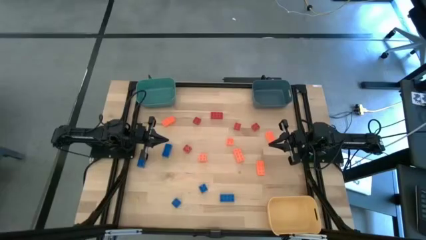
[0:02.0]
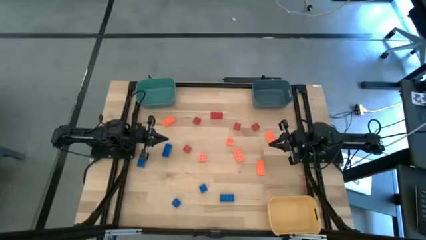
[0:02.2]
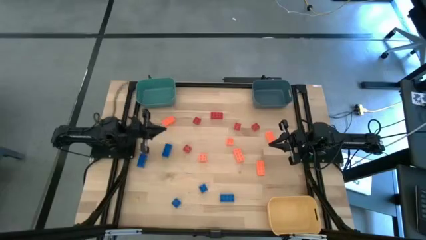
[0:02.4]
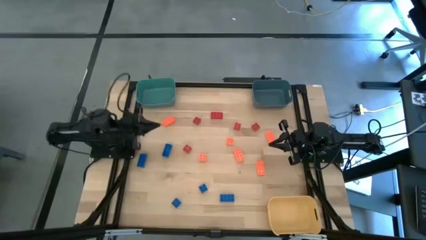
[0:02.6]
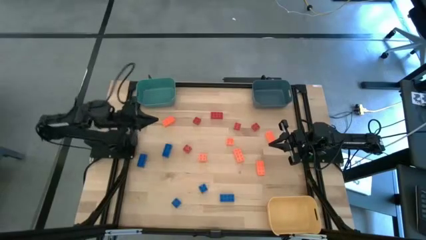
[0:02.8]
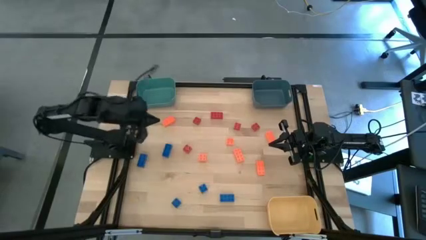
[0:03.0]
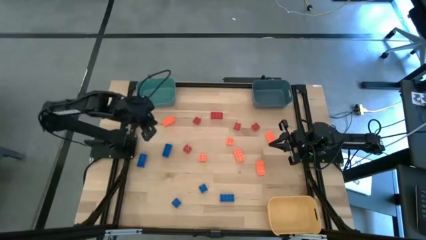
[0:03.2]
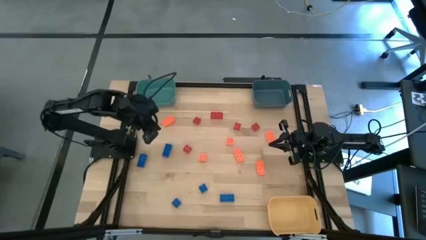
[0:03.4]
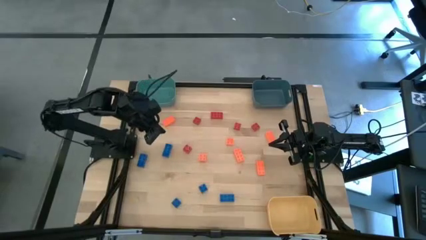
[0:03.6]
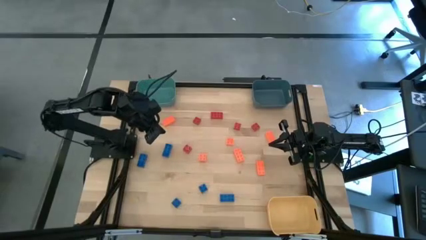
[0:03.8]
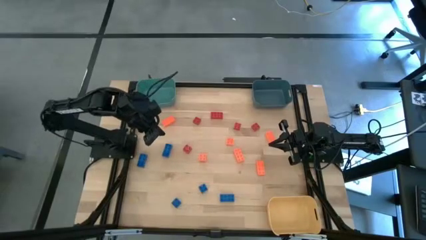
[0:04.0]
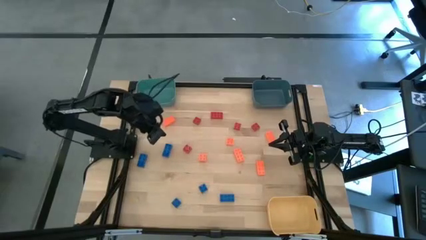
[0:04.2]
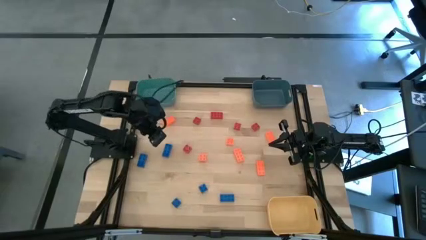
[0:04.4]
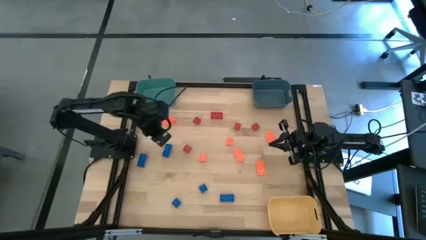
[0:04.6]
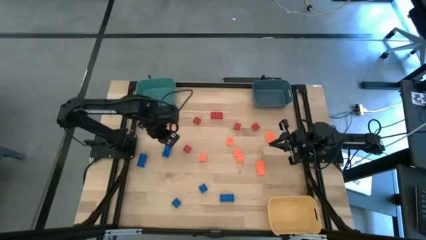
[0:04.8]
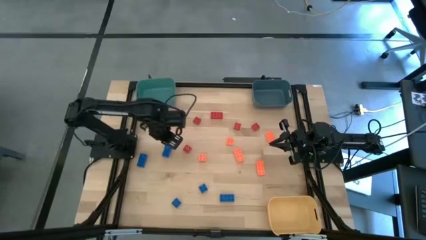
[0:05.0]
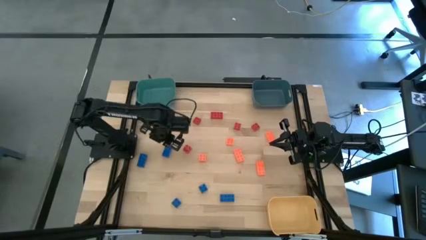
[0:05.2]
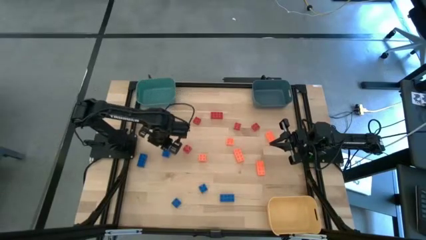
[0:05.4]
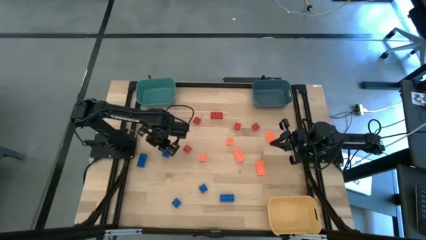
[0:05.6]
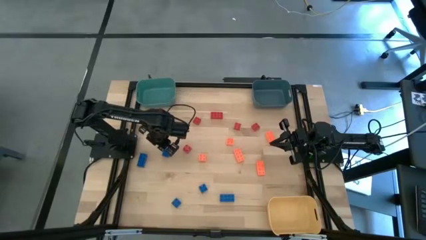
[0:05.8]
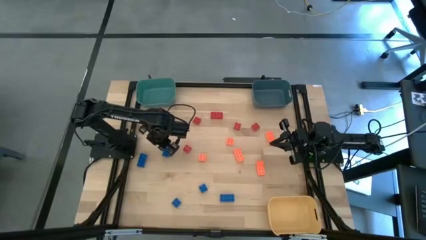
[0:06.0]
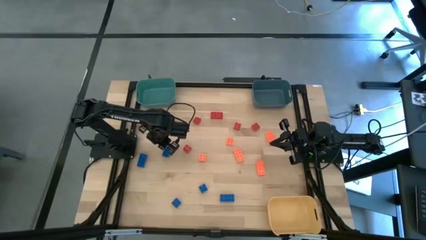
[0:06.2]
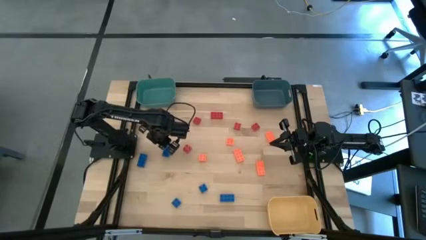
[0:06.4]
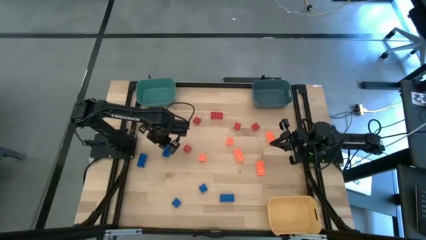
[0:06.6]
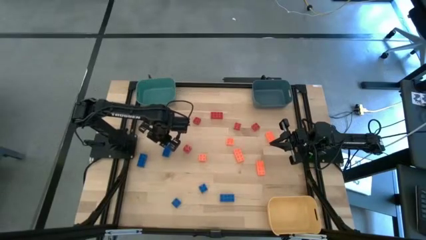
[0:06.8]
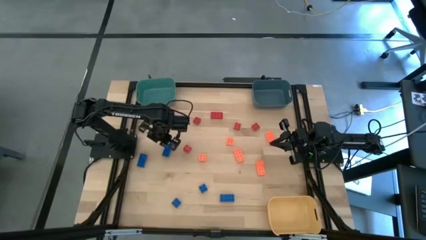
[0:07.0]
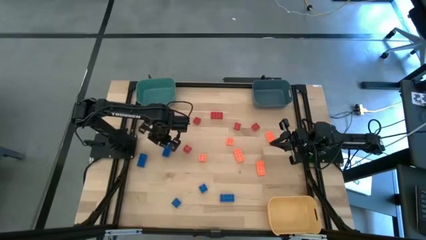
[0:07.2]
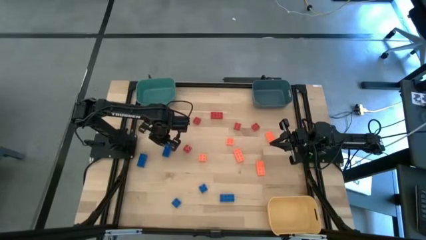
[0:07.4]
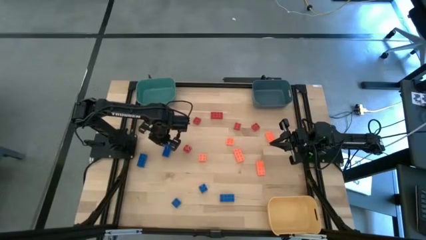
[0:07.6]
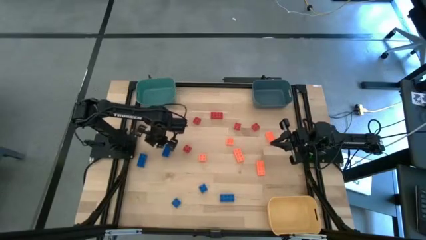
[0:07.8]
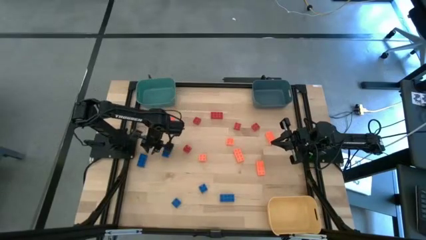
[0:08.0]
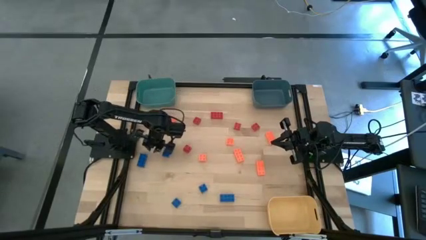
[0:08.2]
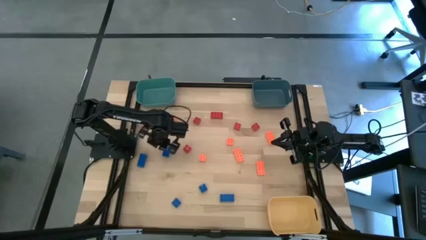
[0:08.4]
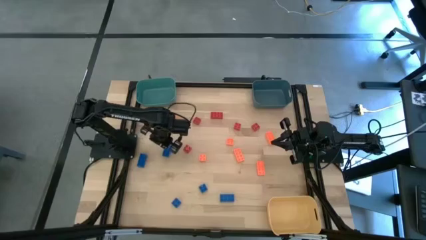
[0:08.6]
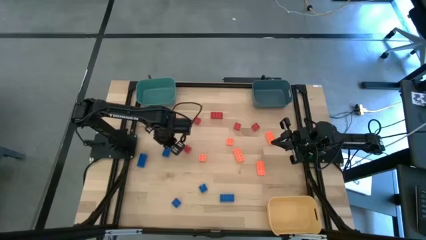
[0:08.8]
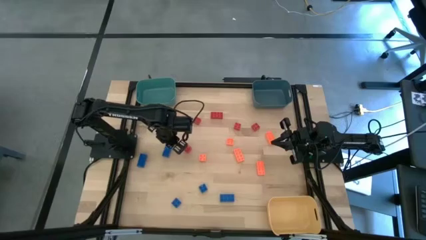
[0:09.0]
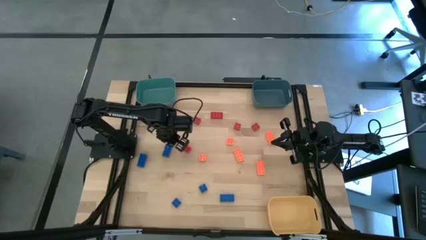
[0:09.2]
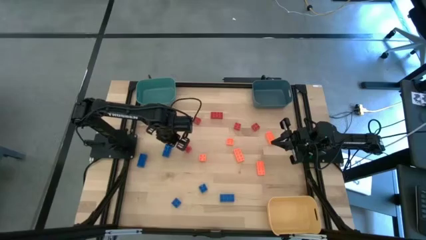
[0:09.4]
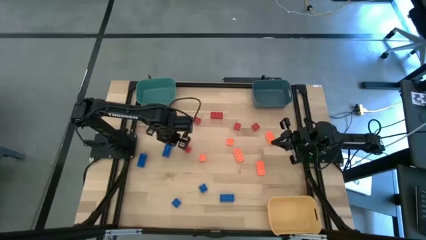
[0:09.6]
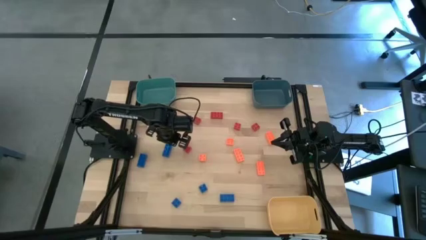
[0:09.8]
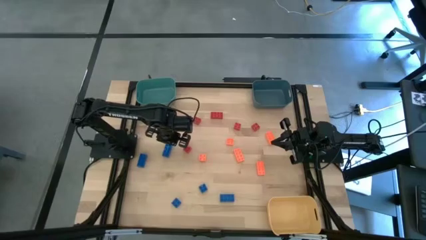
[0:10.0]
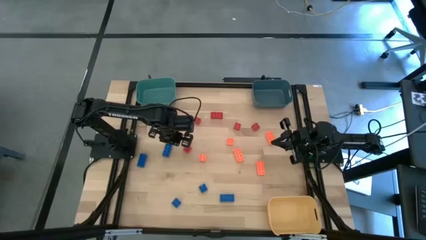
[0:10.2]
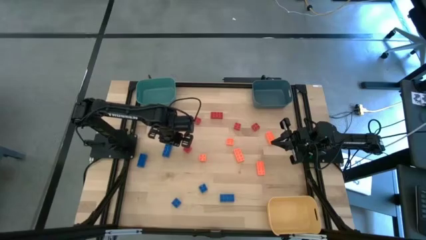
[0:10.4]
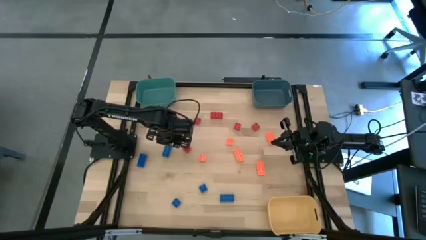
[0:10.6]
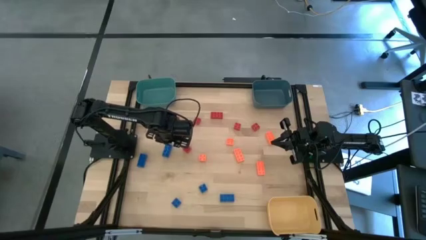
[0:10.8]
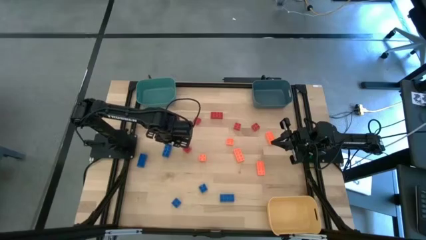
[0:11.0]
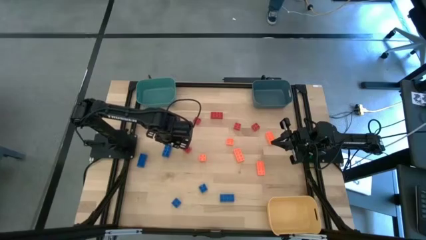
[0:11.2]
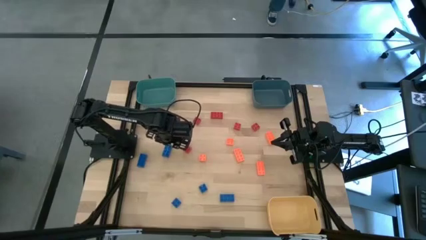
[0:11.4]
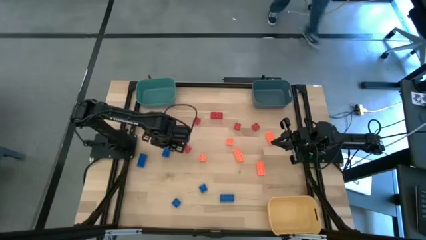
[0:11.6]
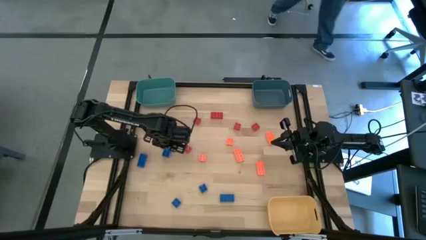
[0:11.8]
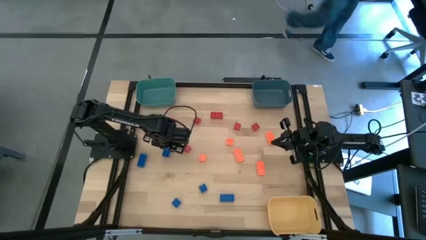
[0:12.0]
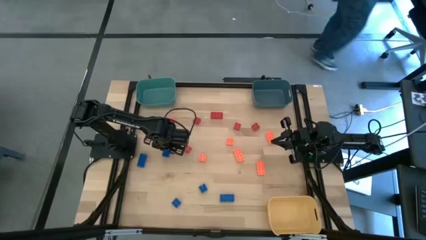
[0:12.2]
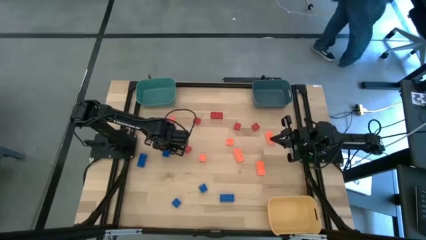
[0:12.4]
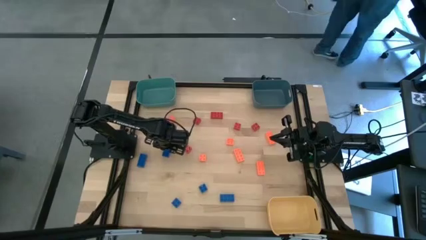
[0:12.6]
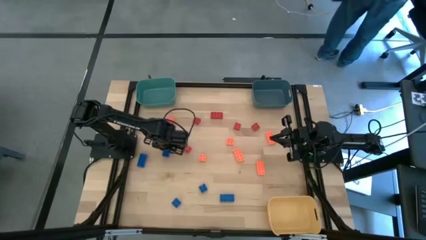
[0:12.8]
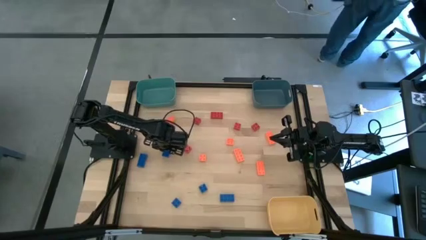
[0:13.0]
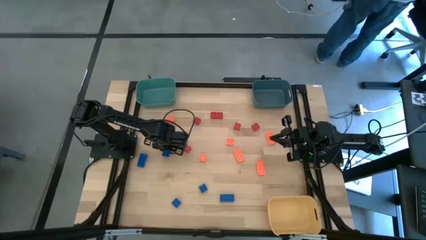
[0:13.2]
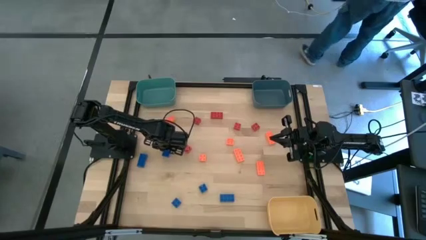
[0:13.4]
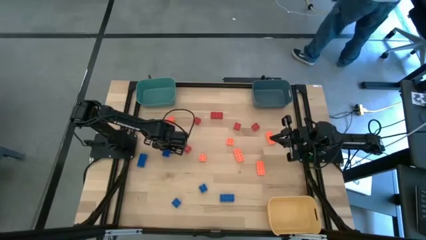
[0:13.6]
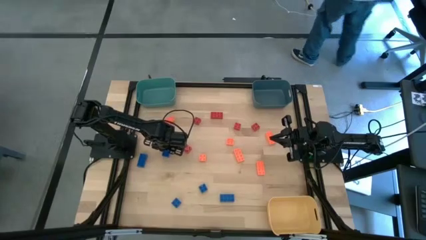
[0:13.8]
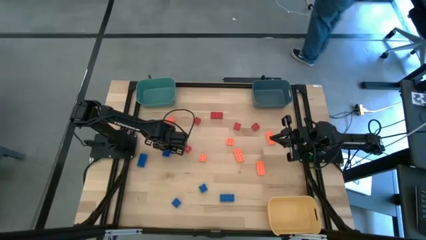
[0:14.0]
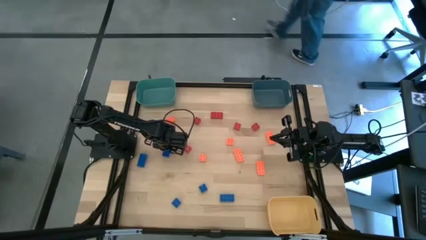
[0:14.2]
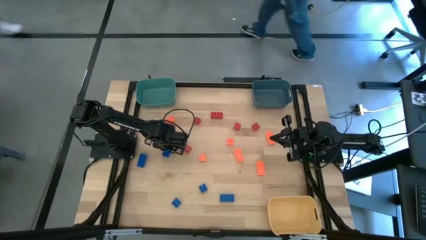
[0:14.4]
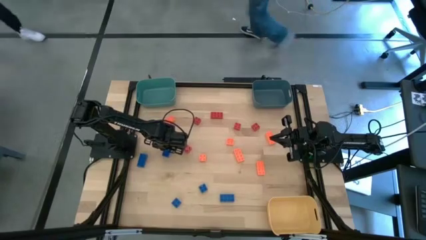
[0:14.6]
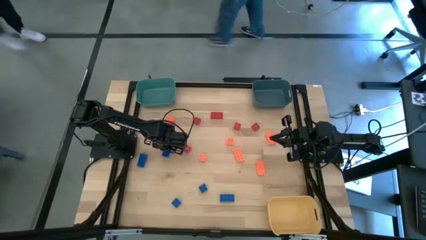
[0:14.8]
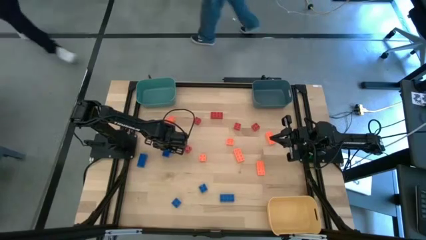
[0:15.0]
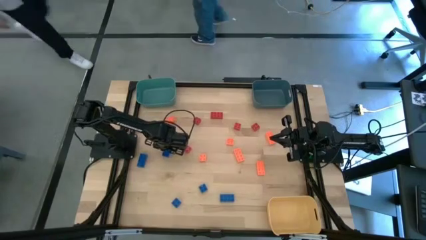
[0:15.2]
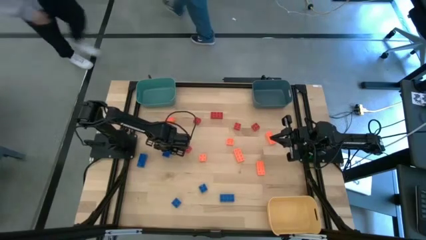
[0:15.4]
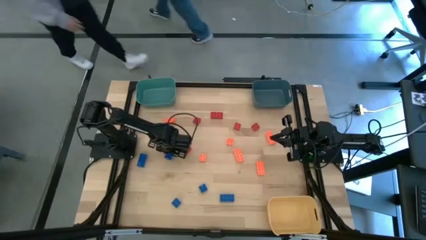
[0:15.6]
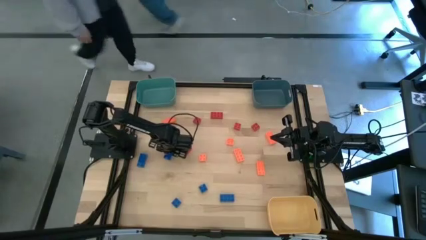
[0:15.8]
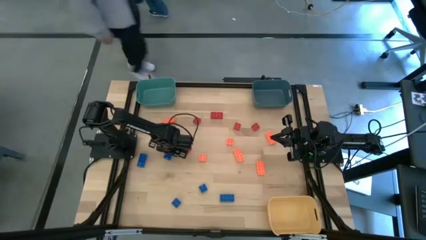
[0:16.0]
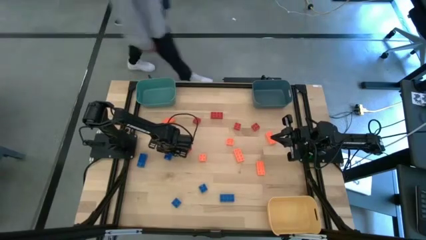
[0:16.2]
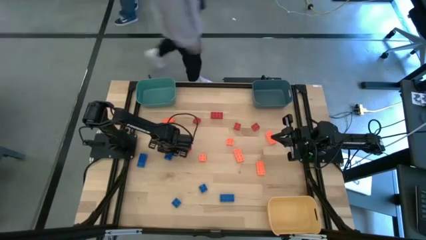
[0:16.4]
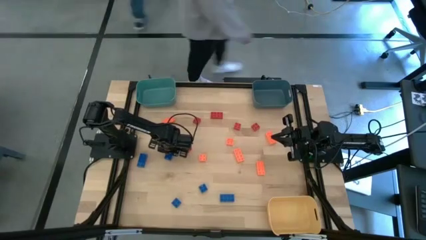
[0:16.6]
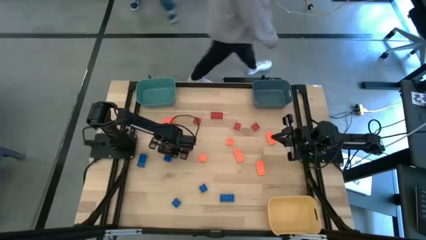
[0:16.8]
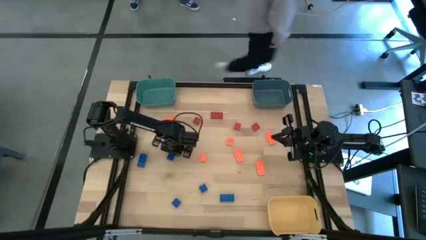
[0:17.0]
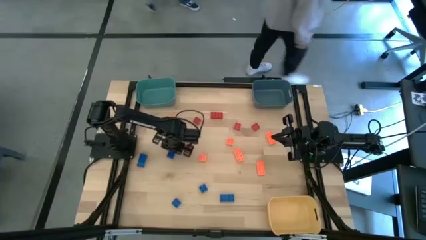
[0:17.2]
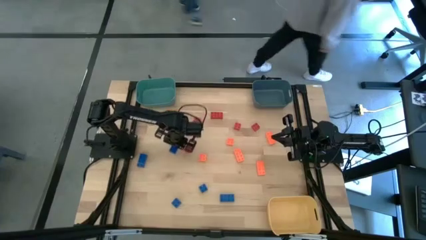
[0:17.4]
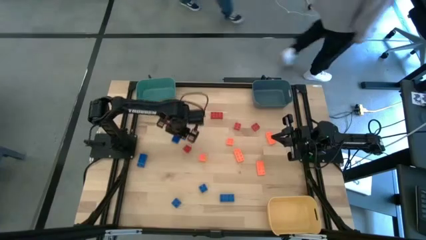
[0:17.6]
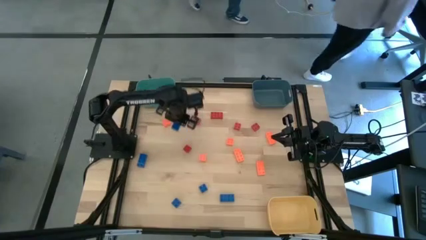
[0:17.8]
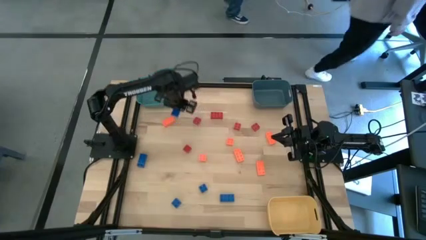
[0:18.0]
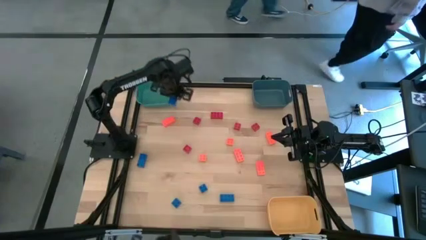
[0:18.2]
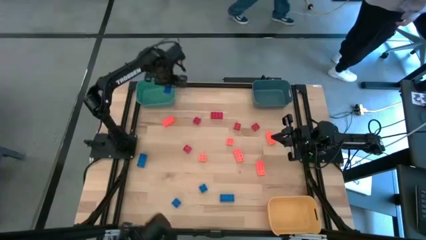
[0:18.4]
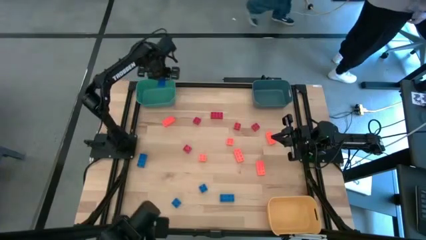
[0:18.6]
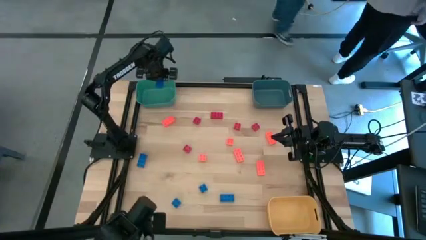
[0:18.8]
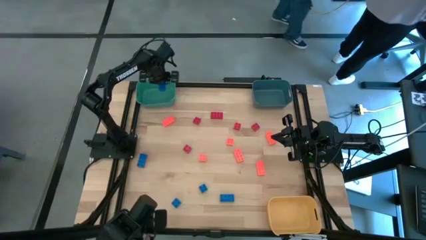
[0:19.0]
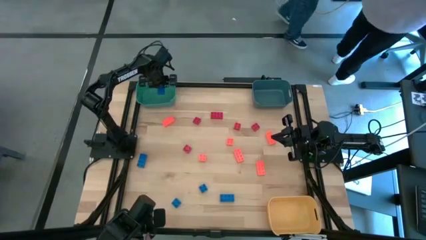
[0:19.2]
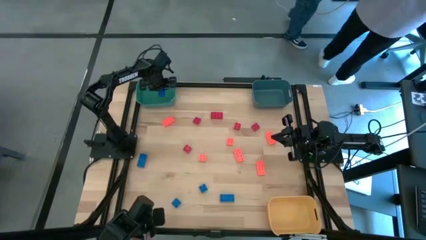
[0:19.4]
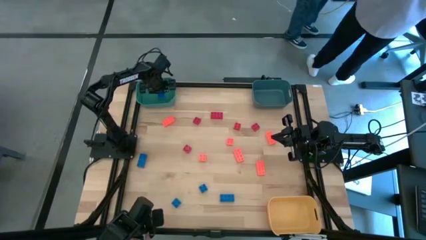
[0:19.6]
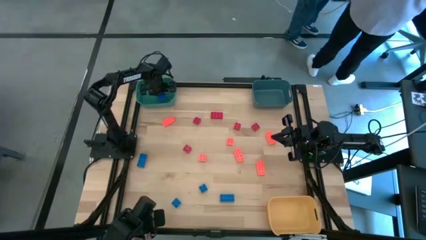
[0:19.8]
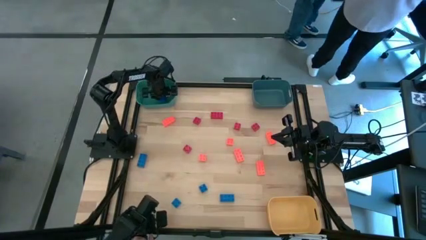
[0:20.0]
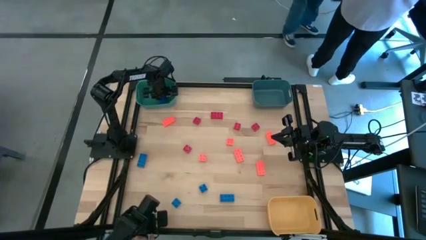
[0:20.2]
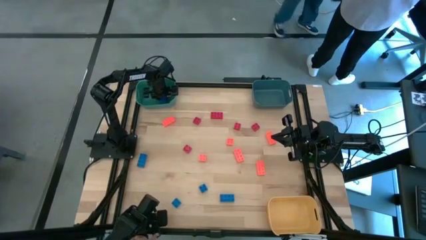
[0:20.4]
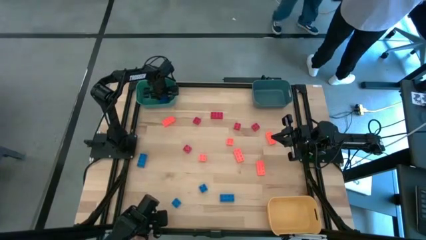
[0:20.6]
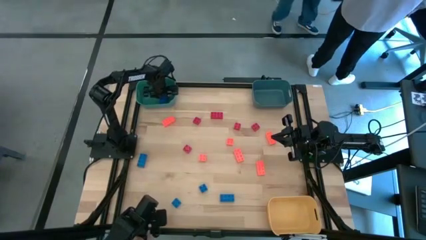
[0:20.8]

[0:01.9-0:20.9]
Task: Sort & place blocks by color
Put the blue game piece into the green bin
